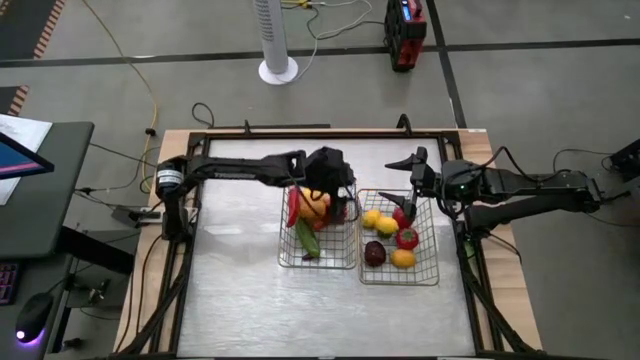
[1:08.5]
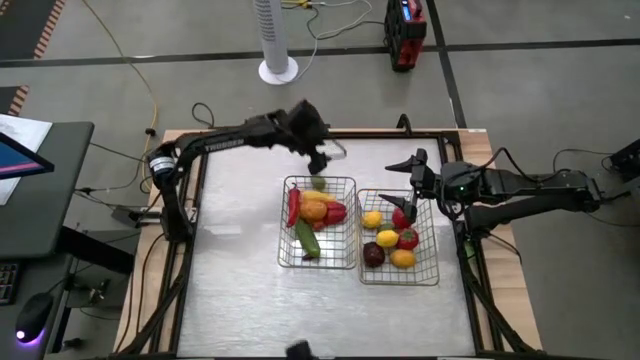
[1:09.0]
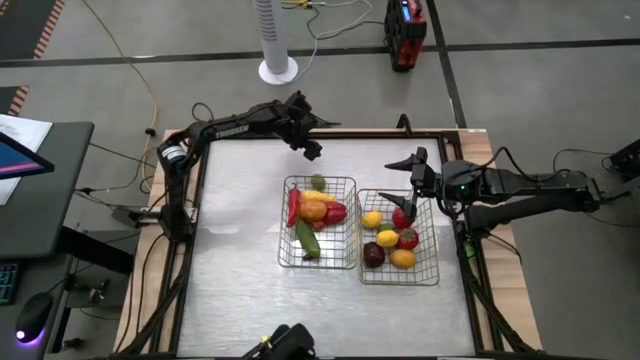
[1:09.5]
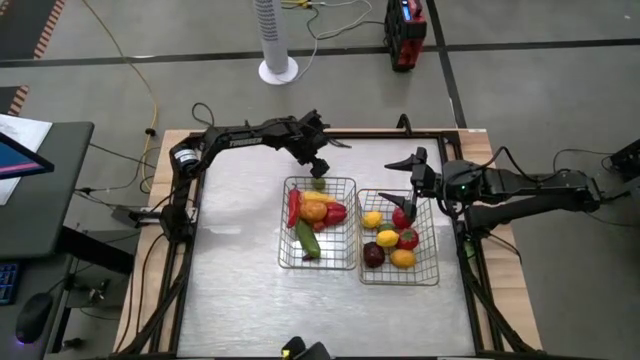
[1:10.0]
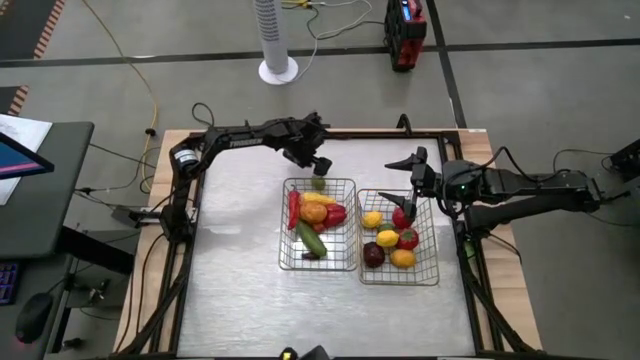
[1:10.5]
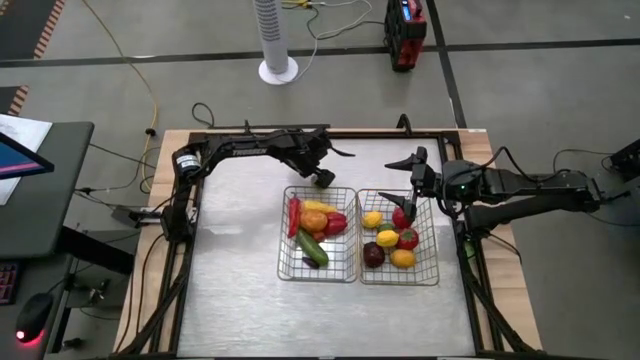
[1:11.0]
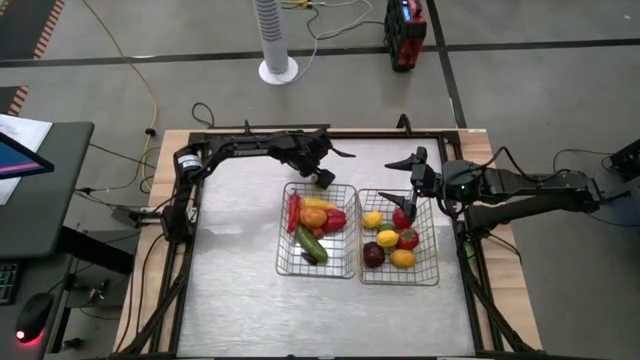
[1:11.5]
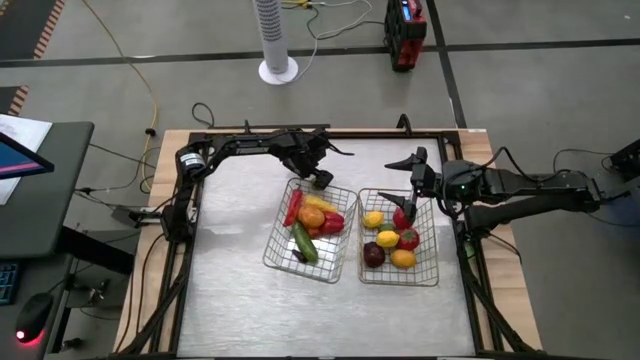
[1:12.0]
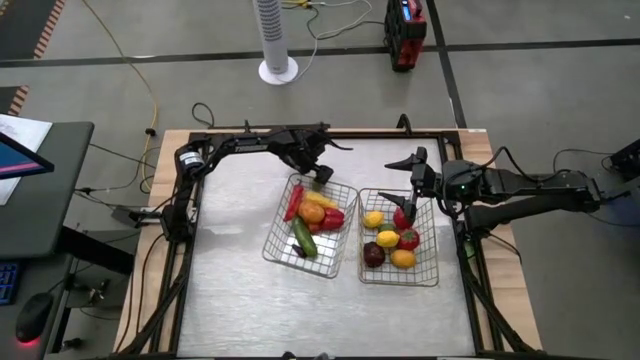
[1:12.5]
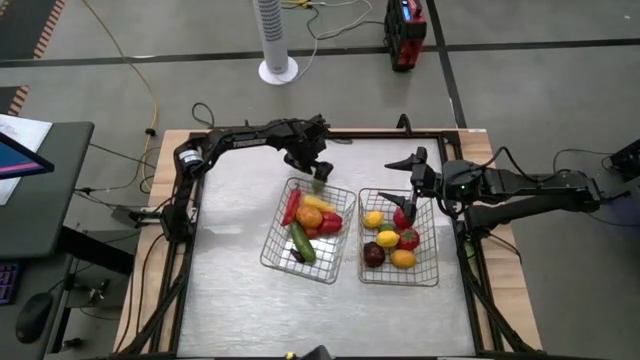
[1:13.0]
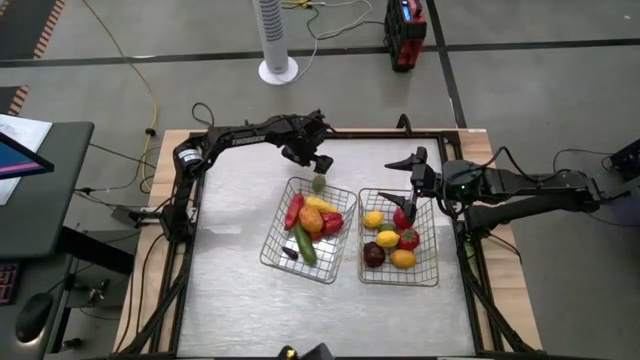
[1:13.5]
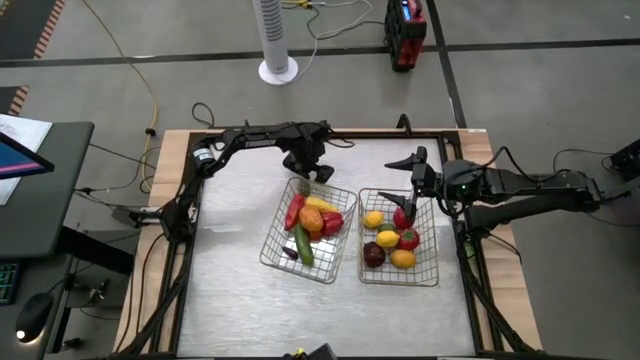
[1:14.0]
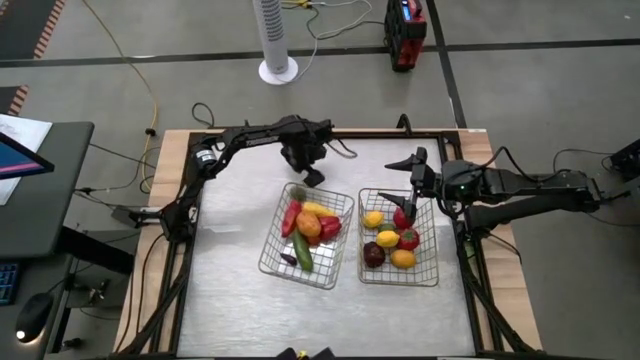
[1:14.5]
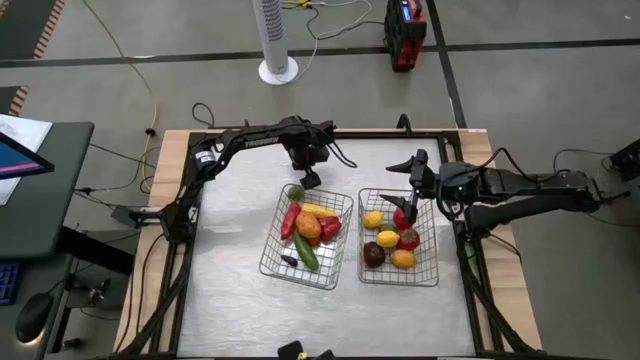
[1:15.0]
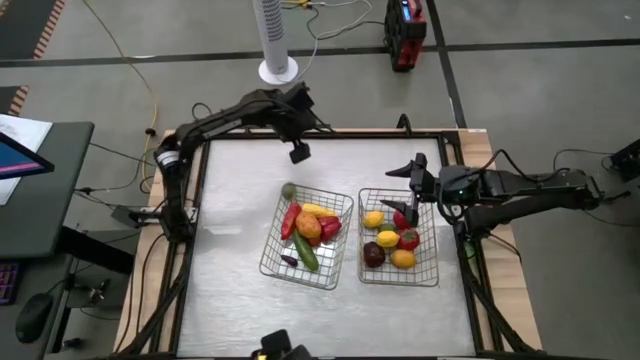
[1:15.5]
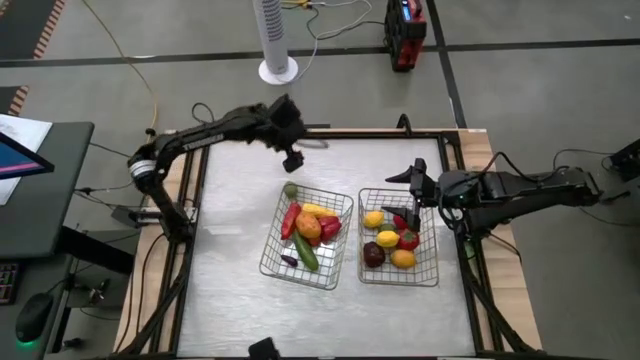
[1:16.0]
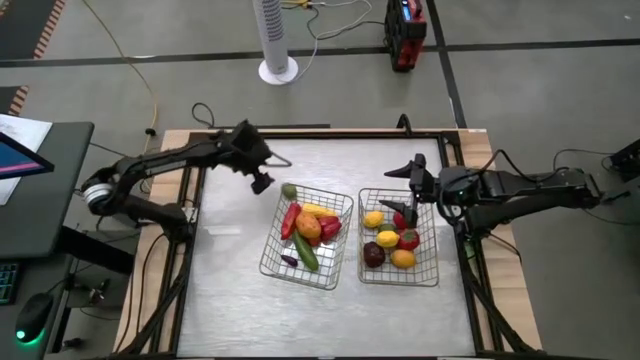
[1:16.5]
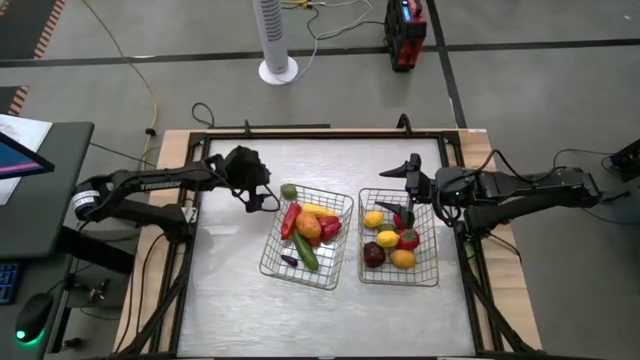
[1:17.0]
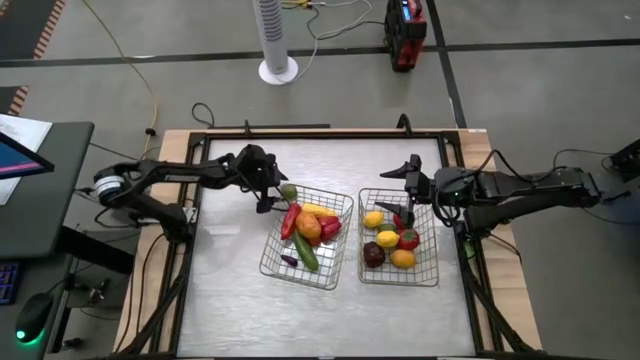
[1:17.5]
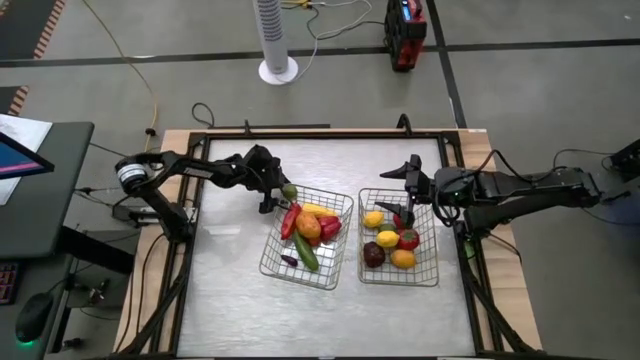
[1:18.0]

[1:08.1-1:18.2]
Task: Sort produce into baskets
Put the lime into the right wire basket

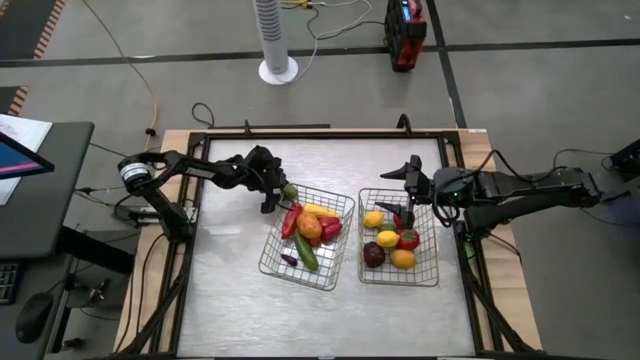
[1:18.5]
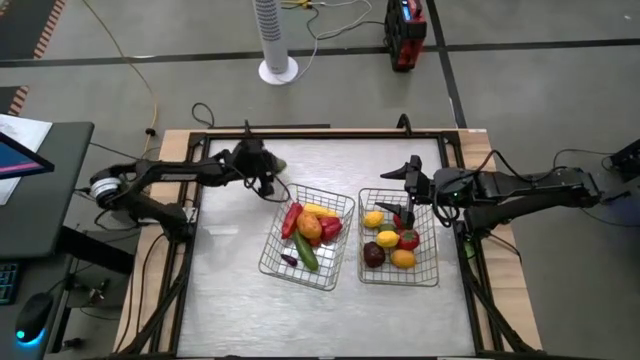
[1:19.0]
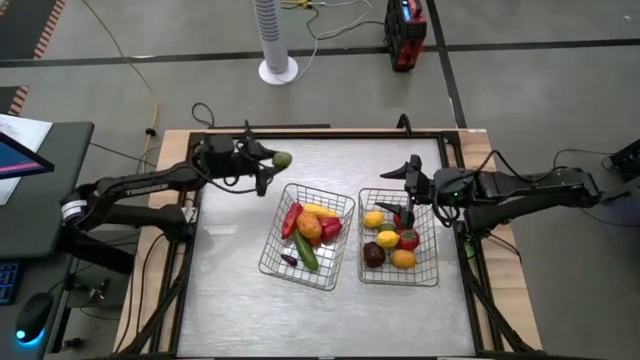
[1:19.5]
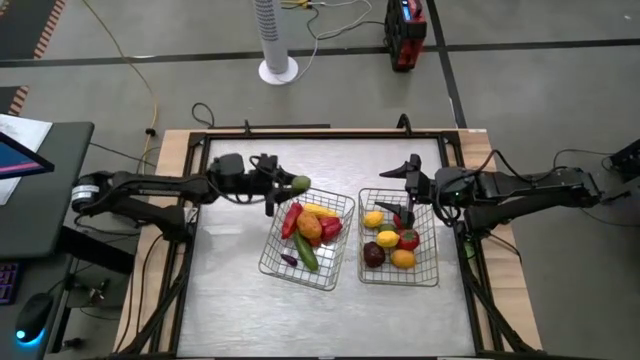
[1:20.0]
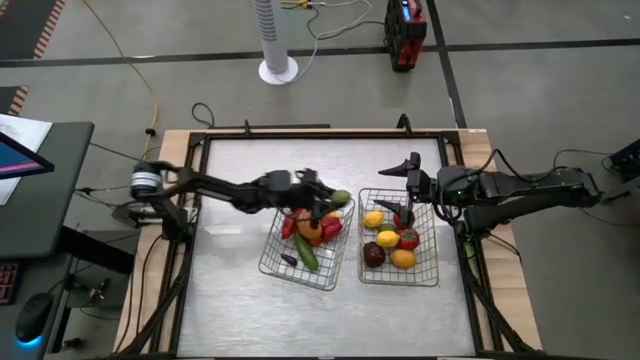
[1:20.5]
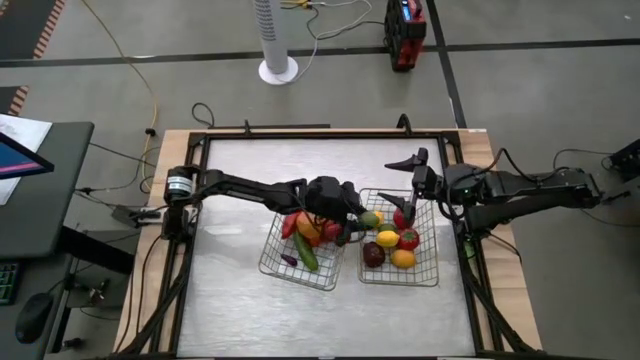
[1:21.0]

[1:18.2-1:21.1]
Put the lime into the right wire basket

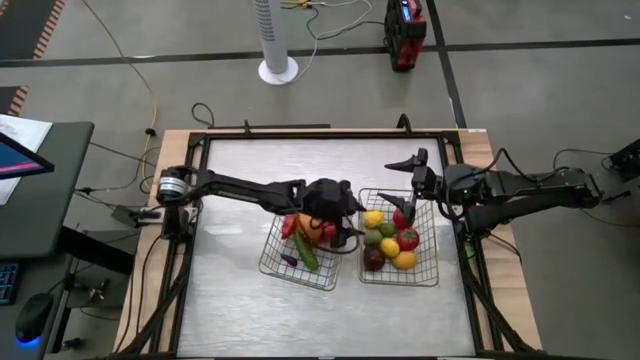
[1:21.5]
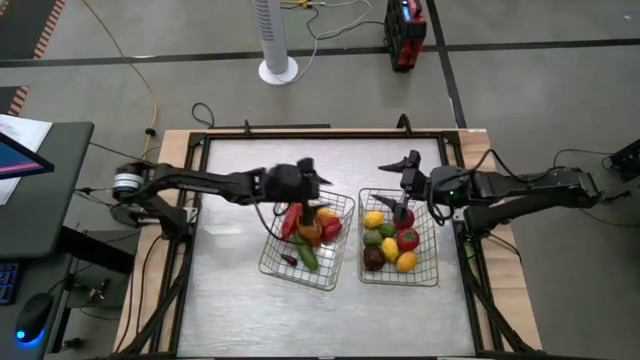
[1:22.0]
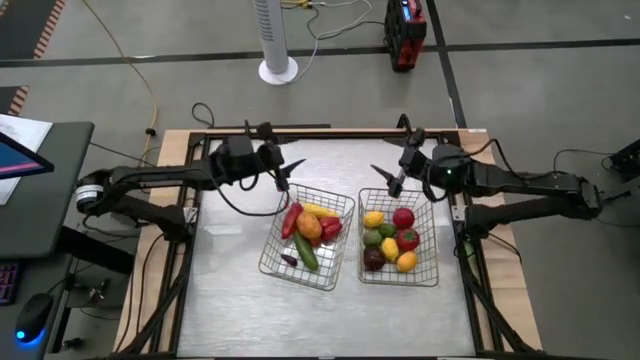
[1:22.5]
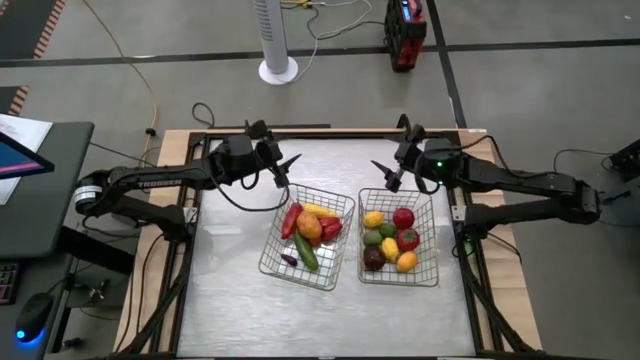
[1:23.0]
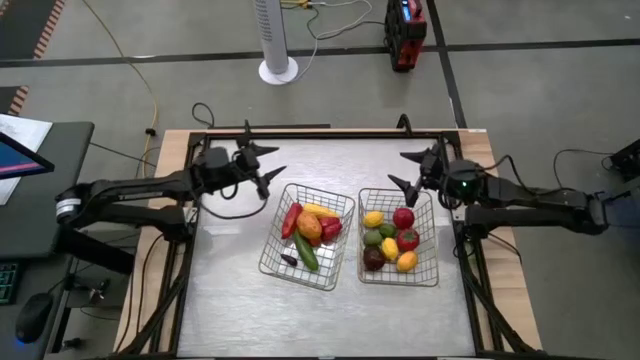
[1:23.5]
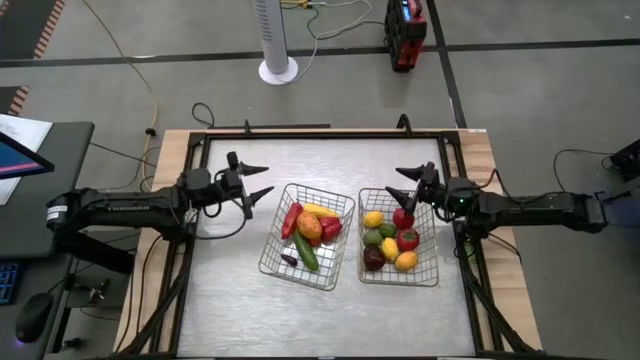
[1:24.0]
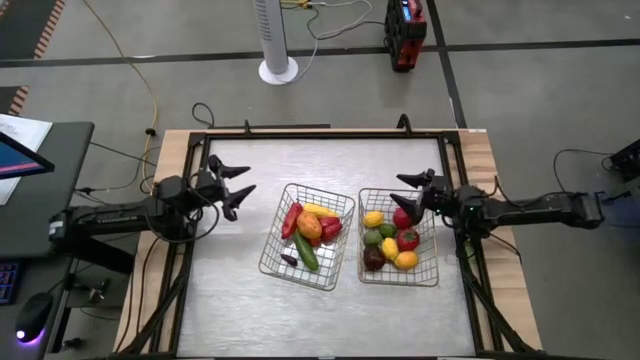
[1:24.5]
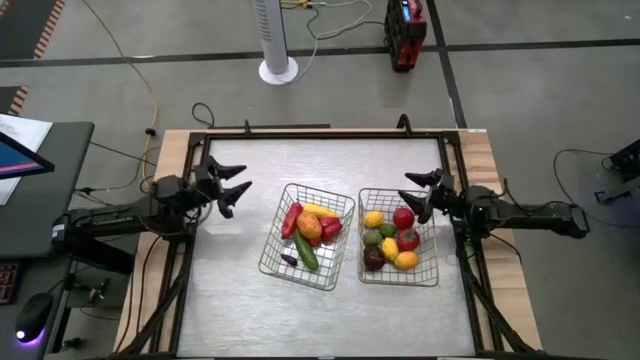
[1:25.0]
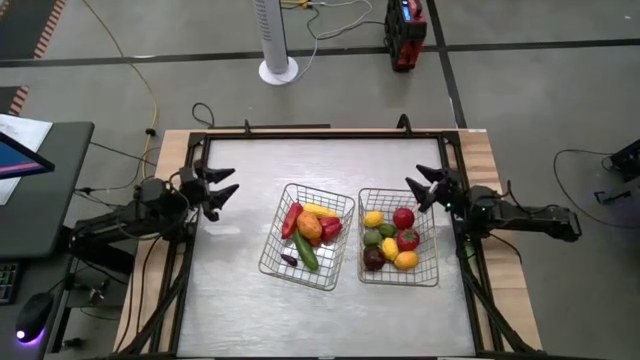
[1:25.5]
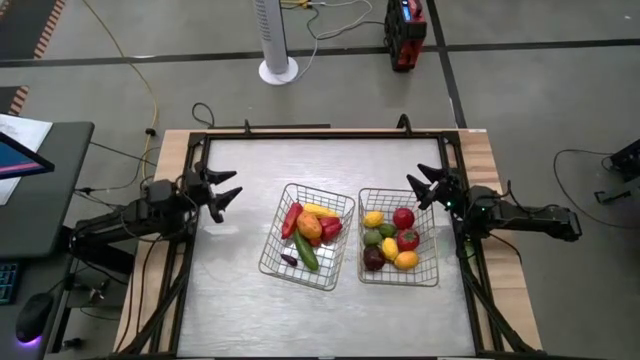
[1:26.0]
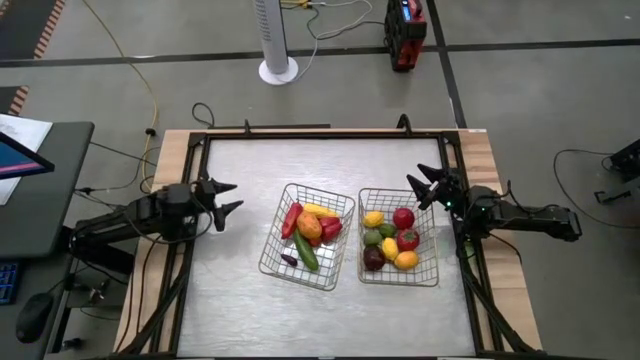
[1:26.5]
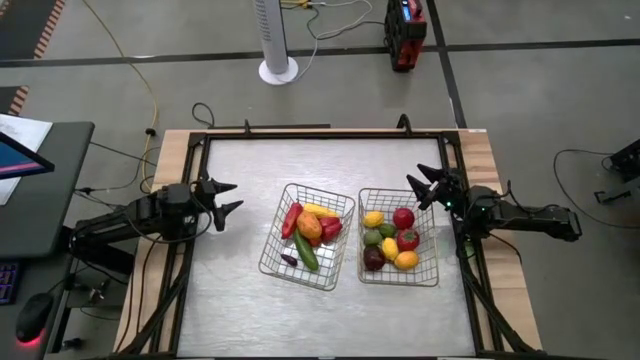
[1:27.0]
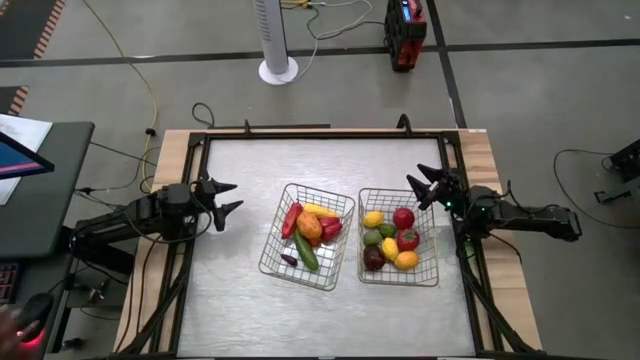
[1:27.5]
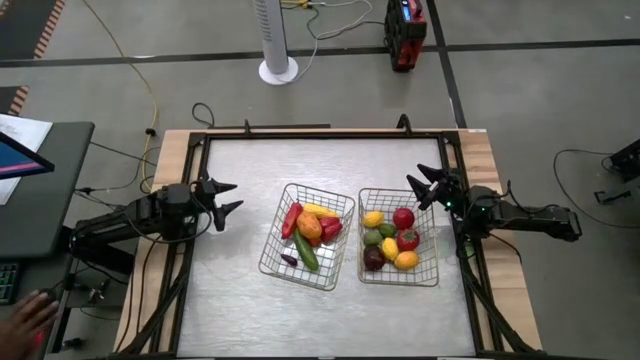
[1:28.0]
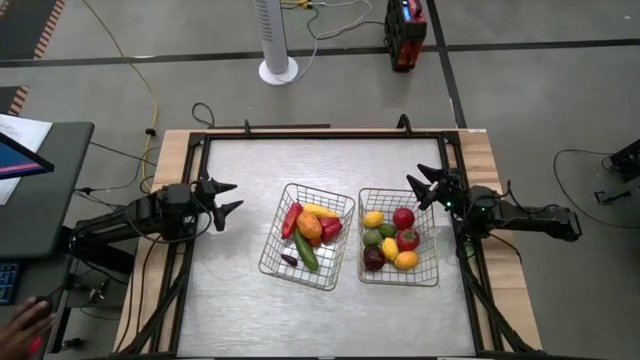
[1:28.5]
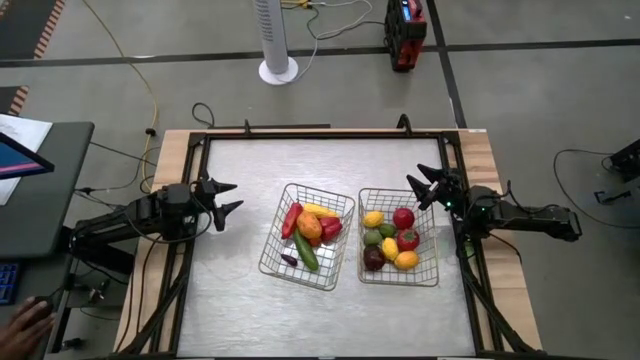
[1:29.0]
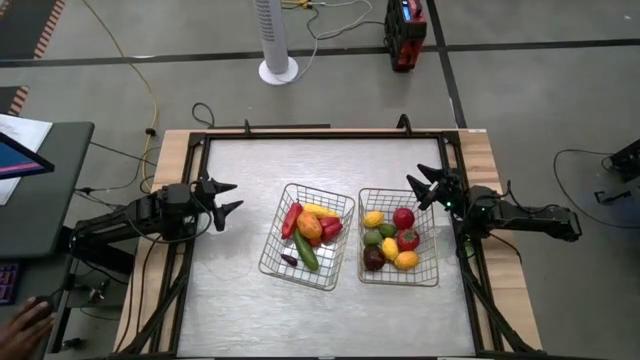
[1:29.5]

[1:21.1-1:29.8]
Return to Home Position
